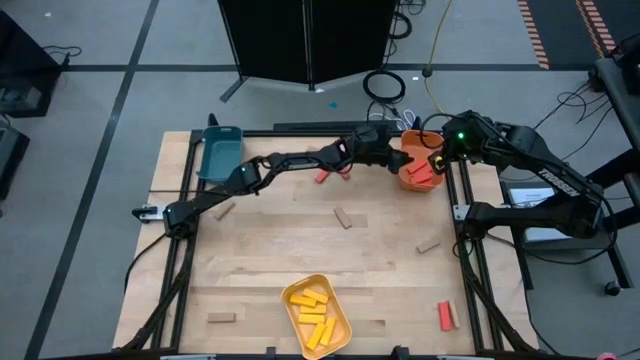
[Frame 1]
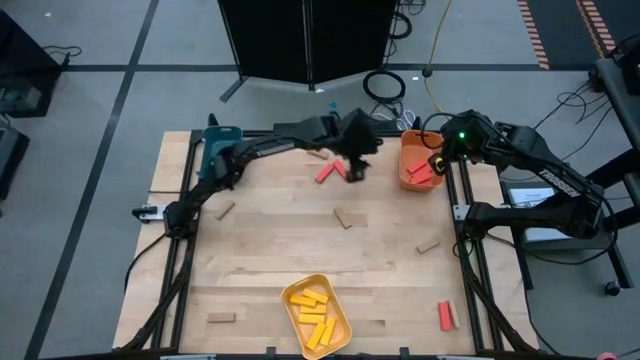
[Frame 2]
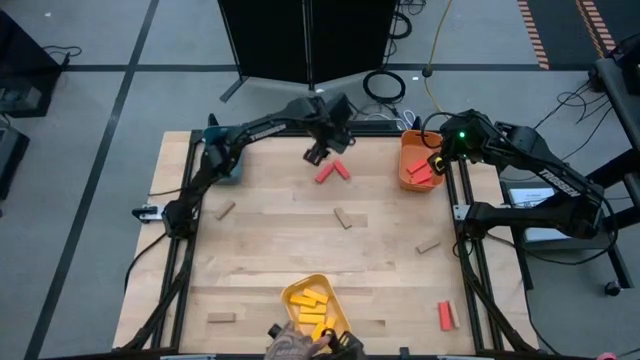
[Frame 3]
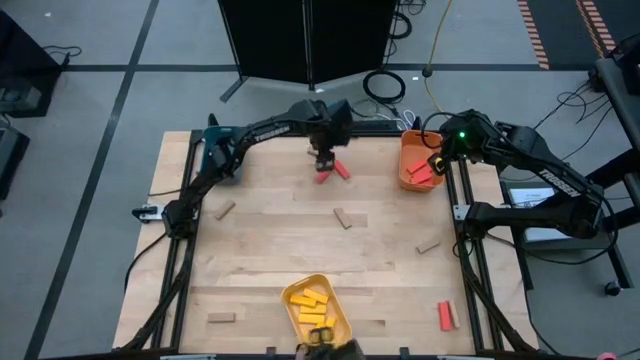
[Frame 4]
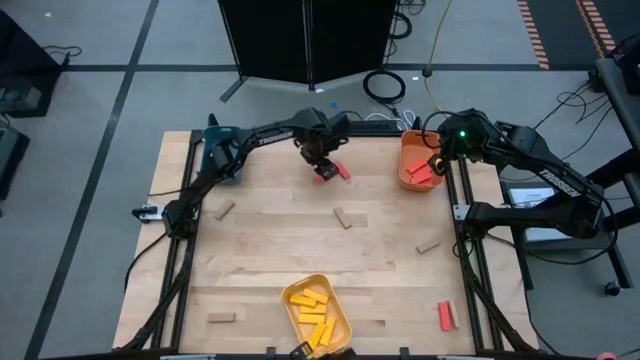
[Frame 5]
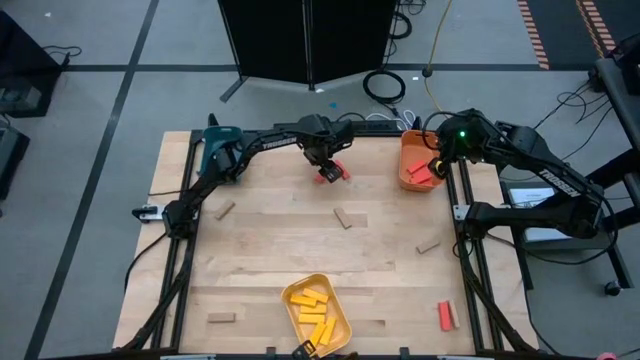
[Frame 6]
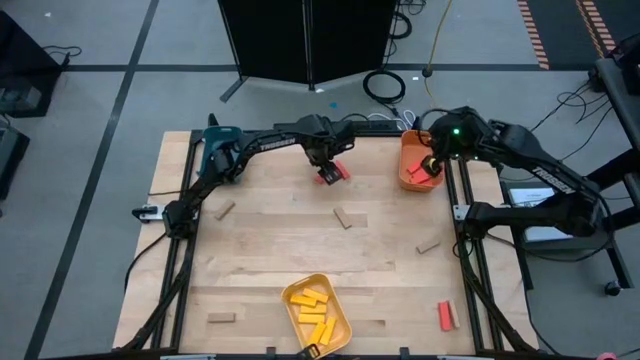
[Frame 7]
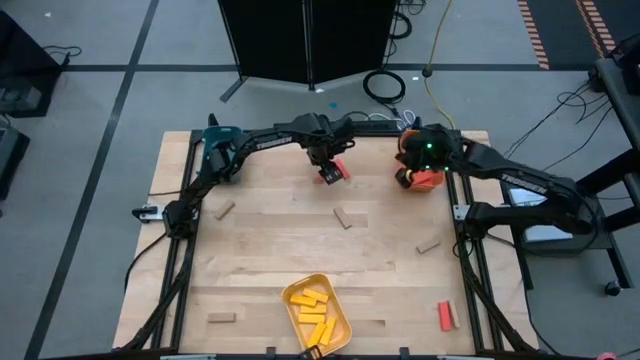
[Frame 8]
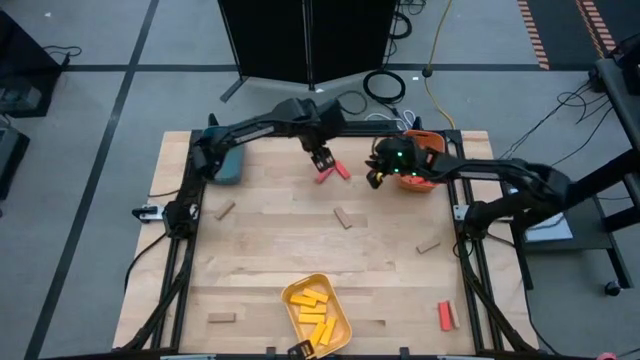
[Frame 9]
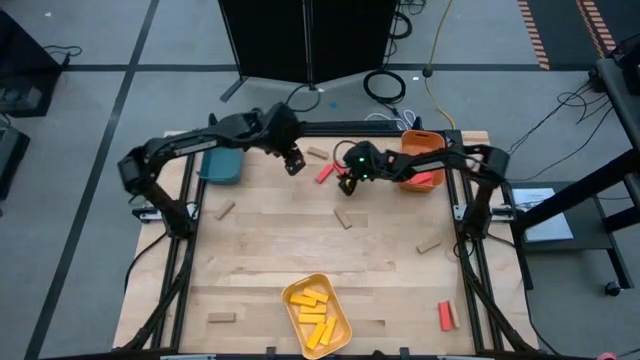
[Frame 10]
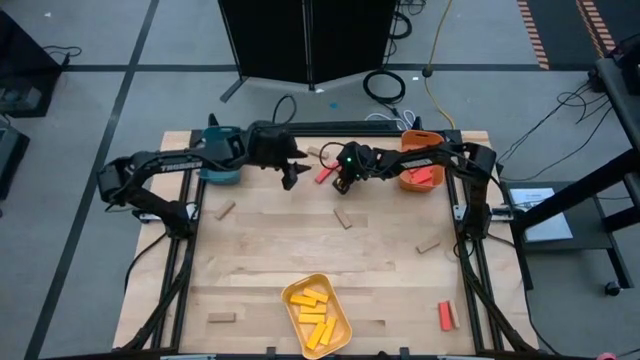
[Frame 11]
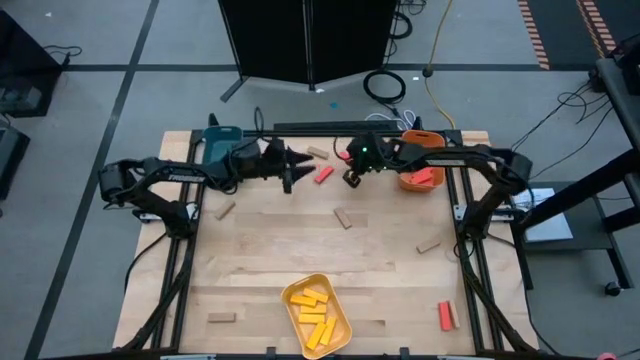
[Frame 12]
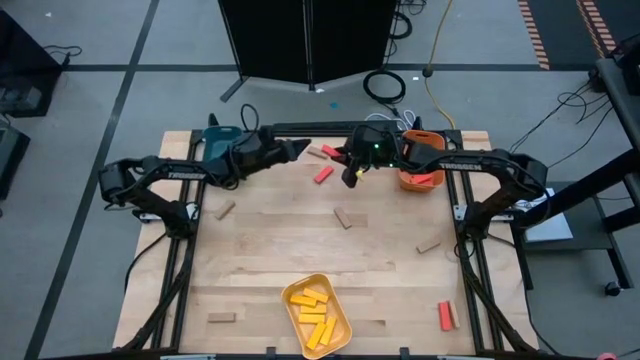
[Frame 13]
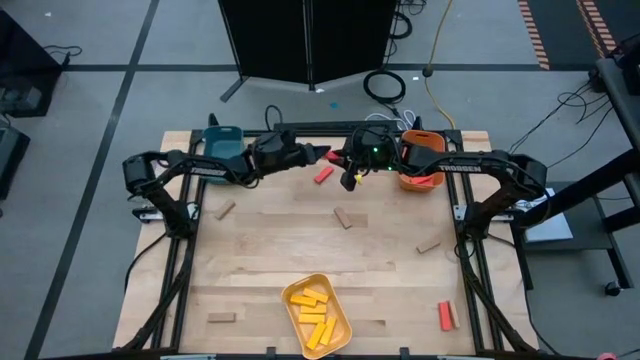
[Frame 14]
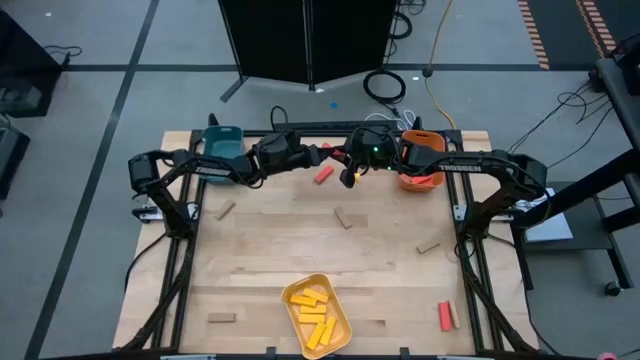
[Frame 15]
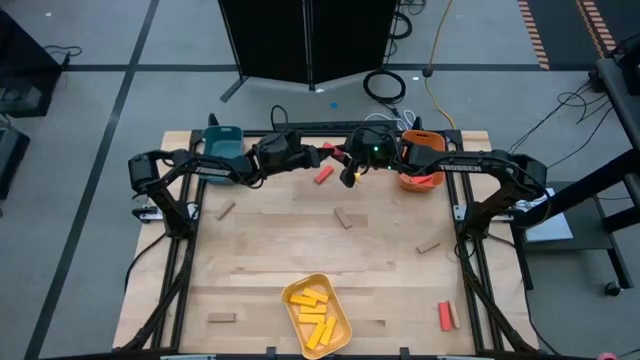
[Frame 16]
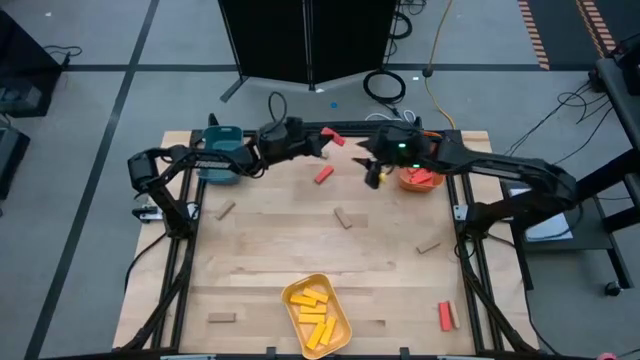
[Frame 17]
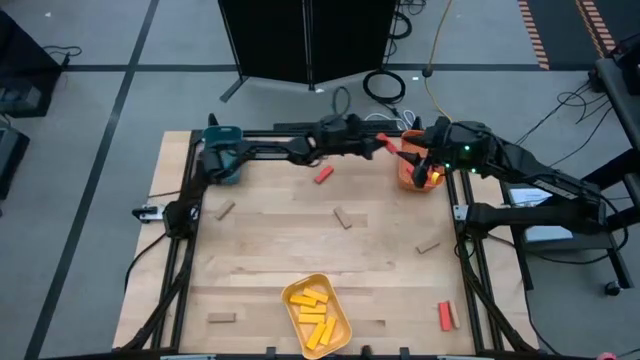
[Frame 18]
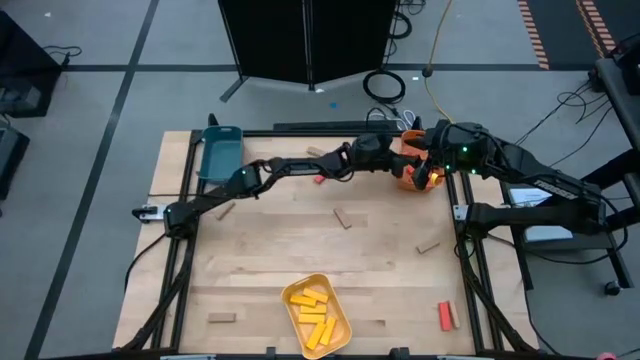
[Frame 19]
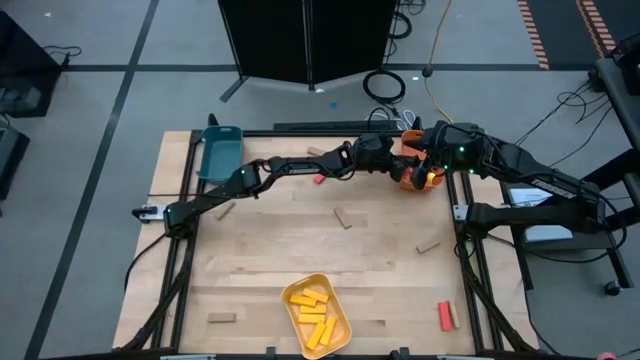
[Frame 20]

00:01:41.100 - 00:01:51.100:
Task: Sort blocks
Put the red block into the orange bin

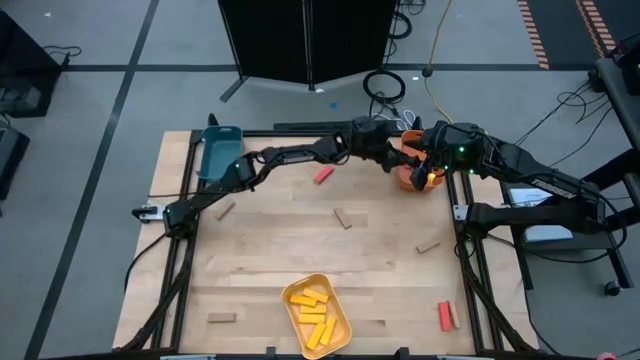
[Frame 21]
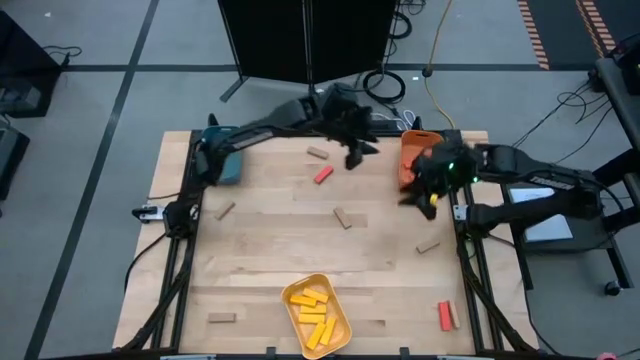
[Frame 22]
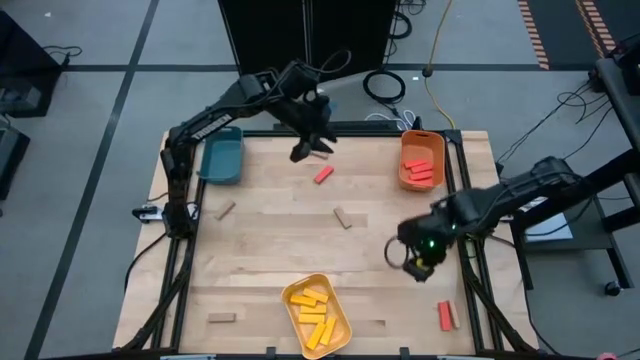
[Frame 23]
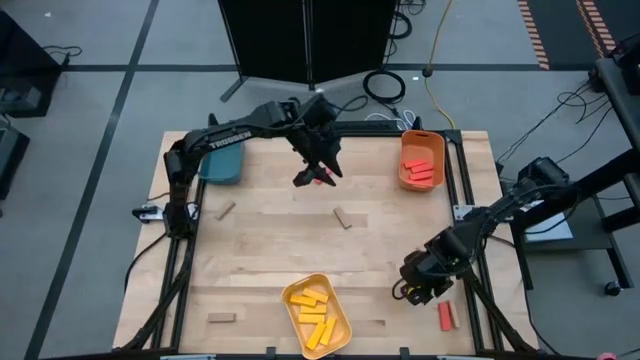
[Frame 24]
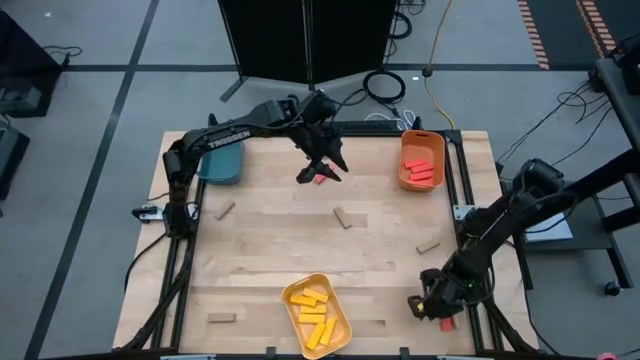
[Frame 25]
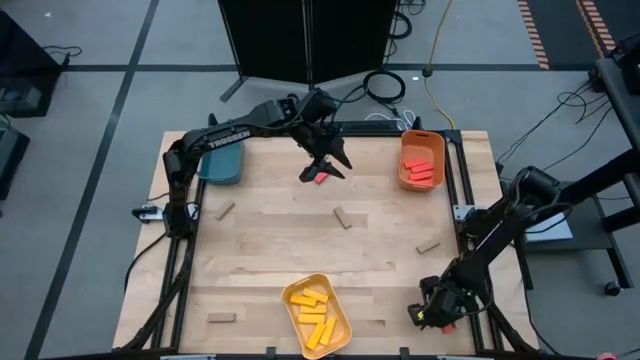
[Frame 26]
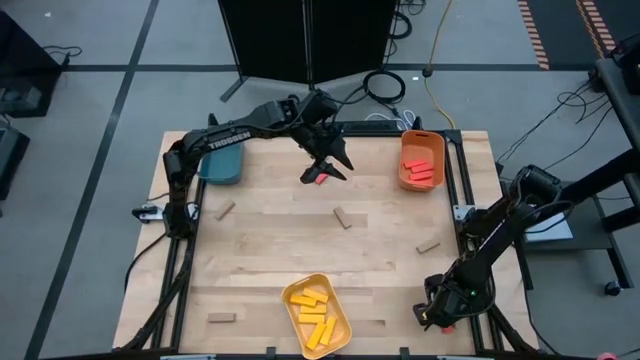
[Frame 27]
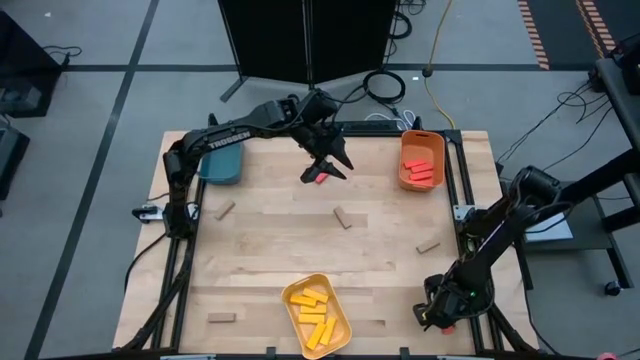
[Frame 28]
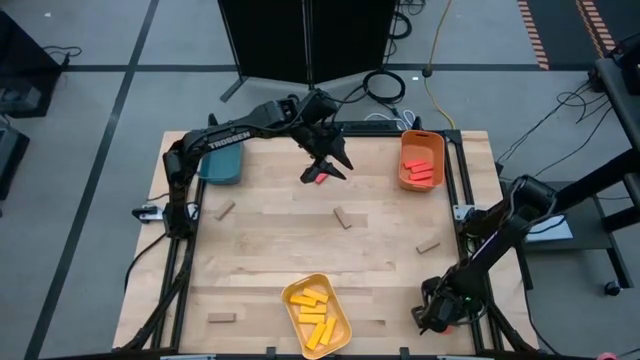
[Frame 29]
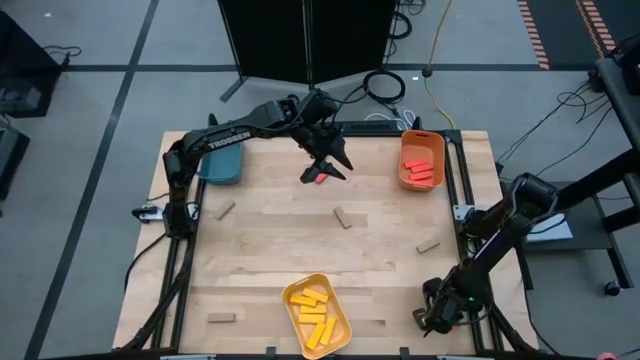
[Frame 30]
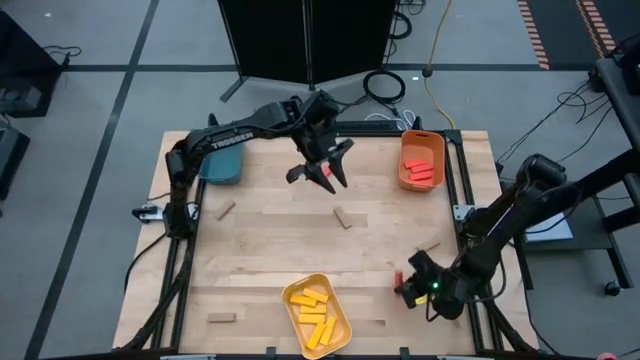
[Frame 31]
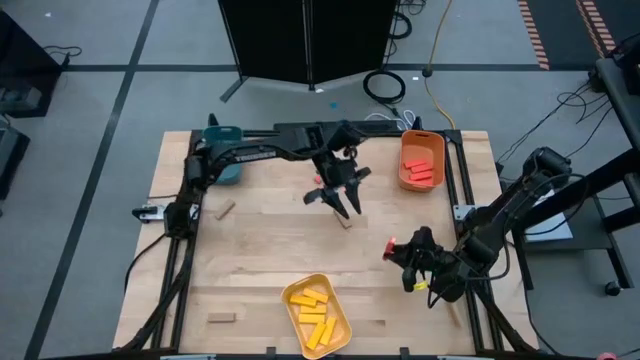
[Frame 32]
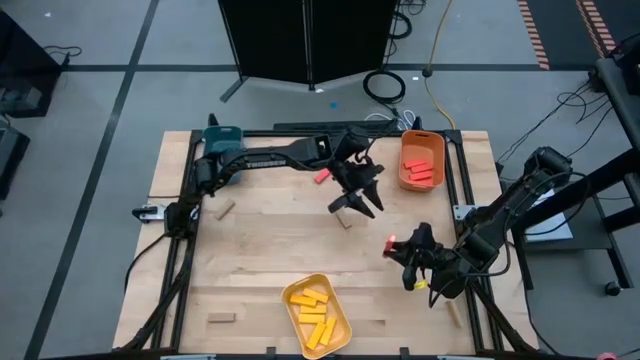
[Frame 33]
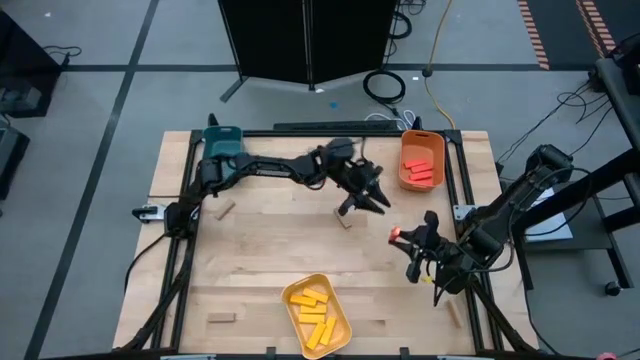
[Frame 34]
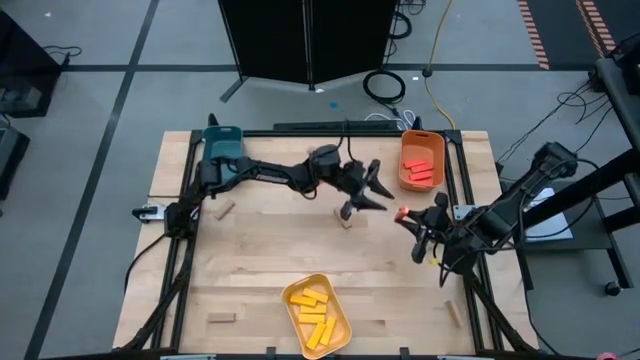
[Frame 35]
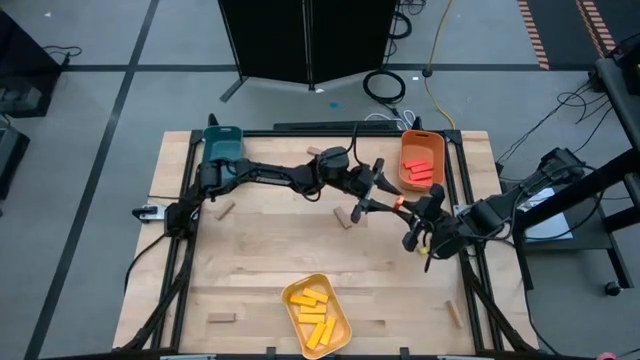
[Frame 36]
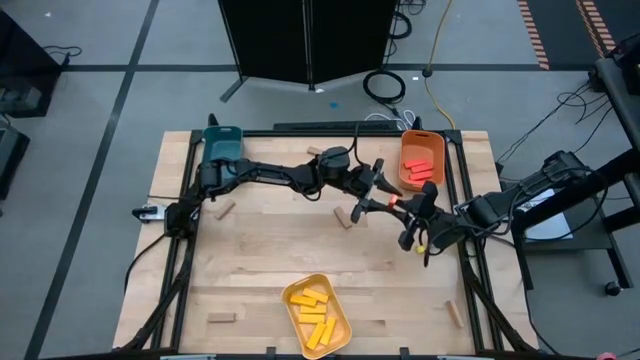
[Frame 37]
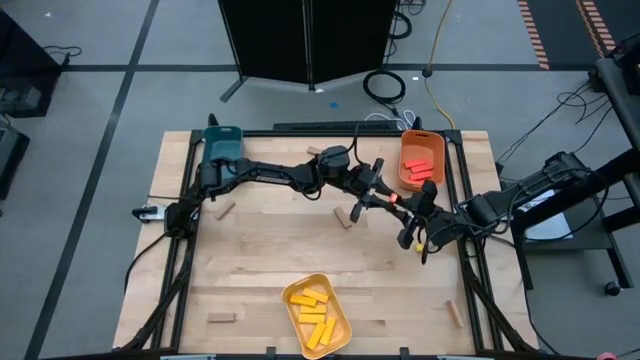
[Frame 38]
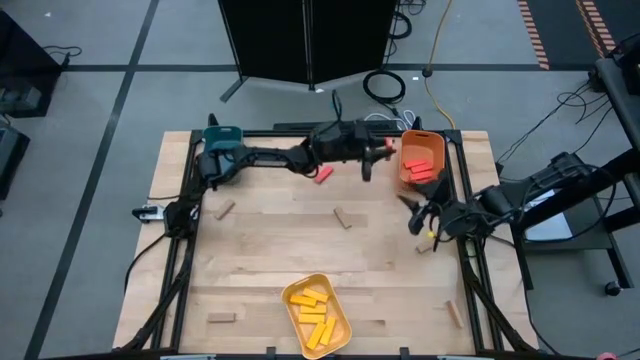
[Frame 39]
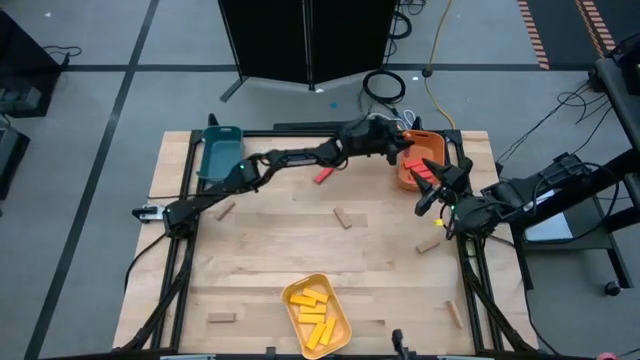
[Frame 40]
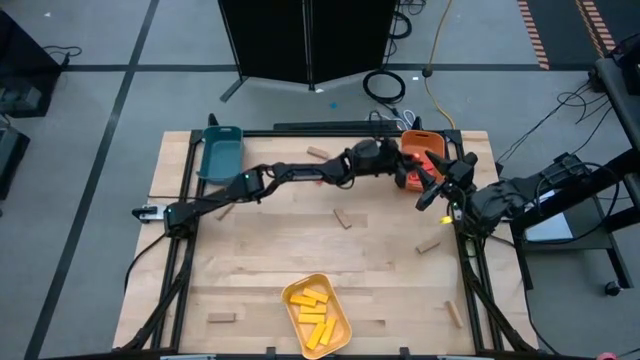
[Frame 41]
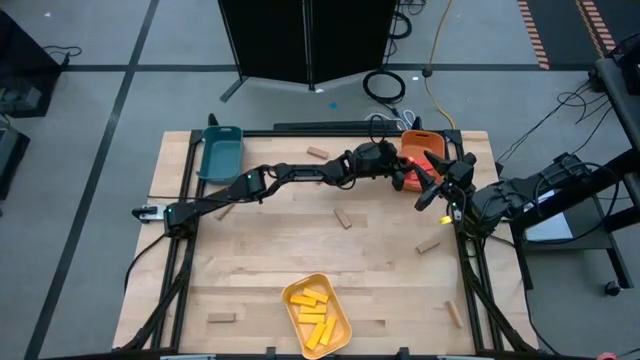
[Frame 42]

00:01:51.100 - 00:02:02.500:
Put the red block into the orange bin
